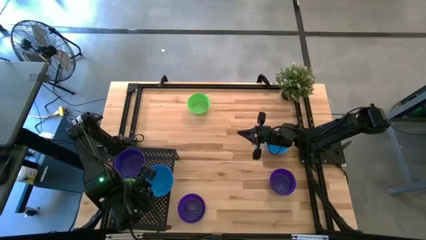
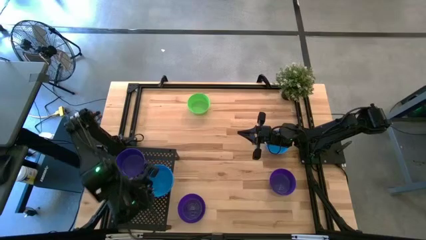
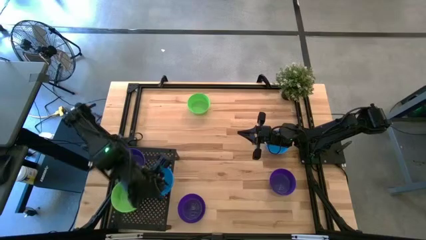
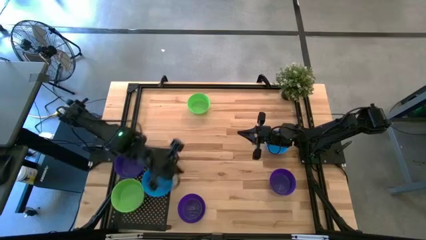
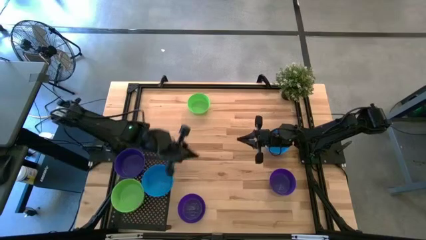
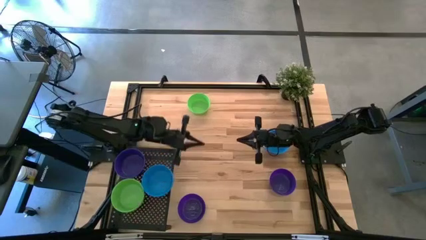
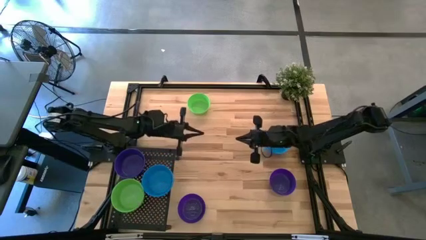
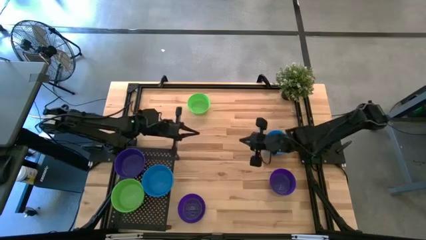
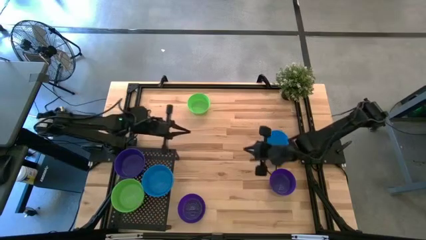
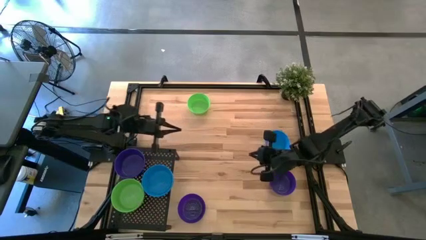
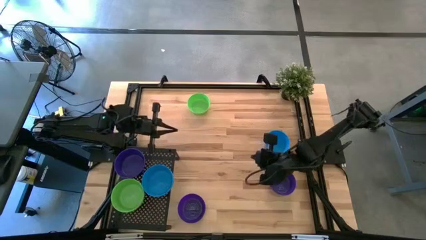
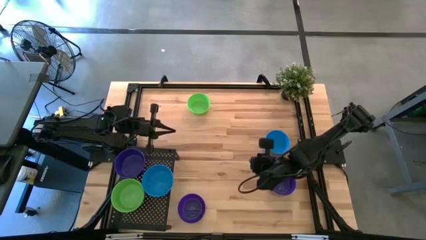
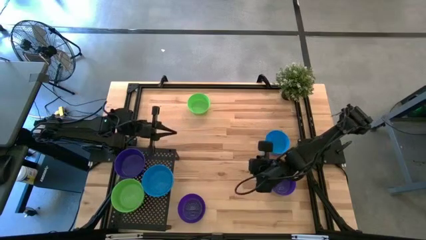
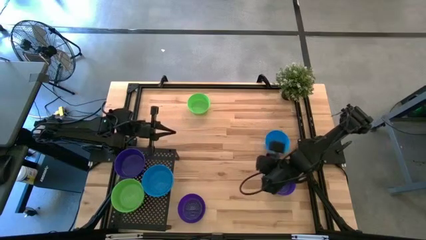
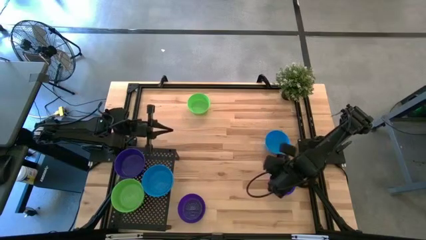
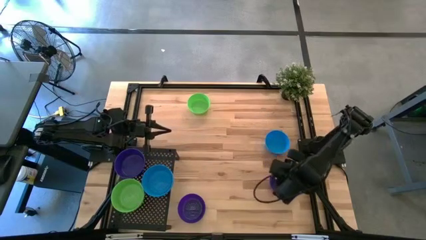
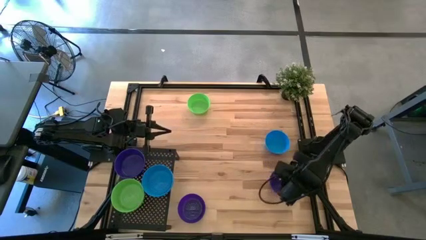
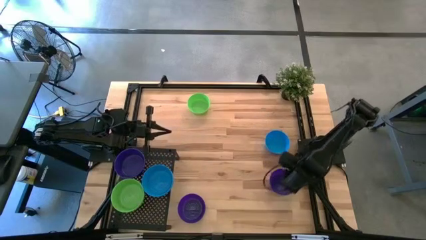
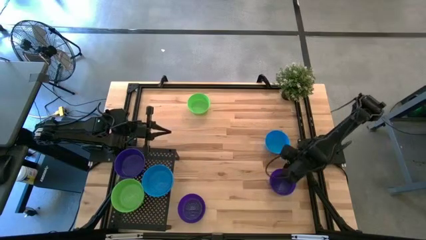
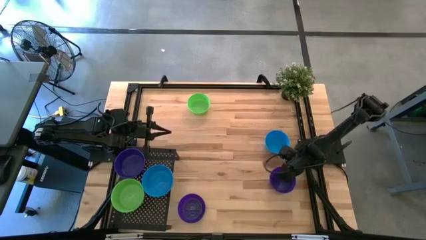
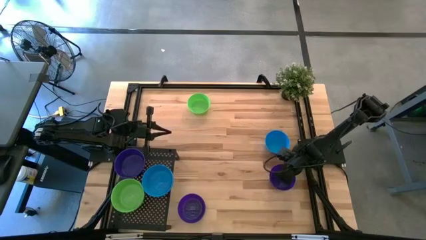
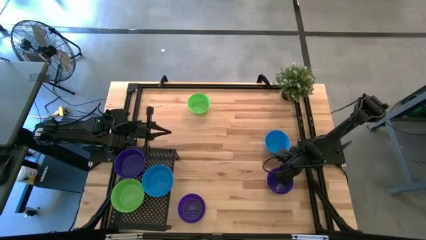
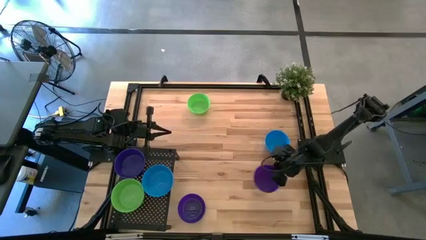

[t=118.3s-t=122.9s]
Task: Pick & Place Mini bowls
Stack the violet bowl on the other violet bowls on the shelf

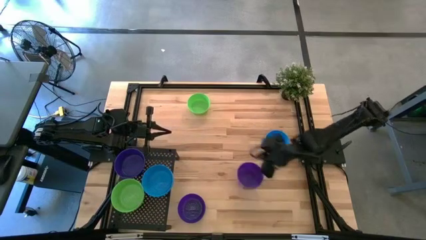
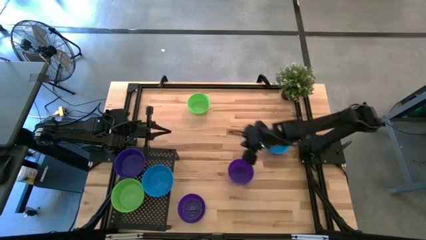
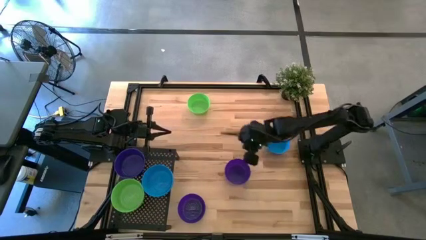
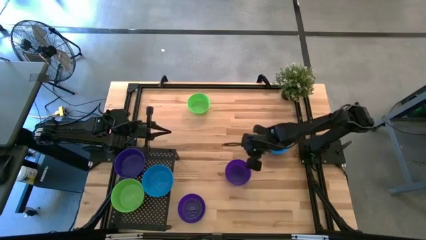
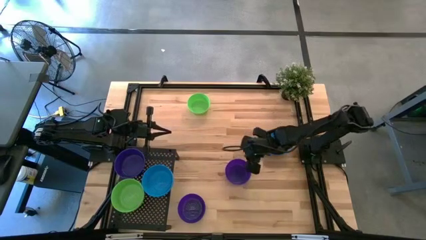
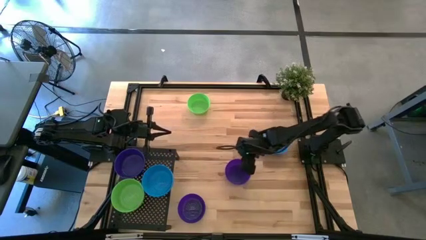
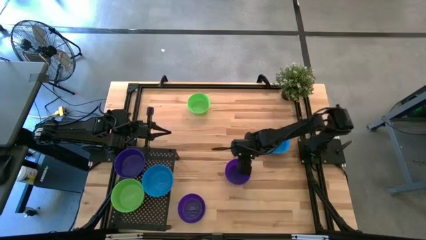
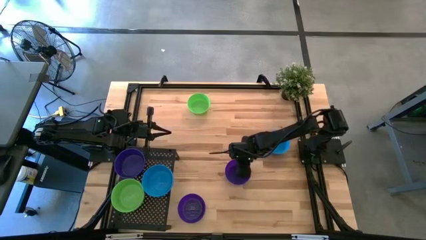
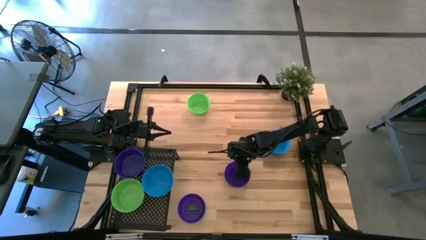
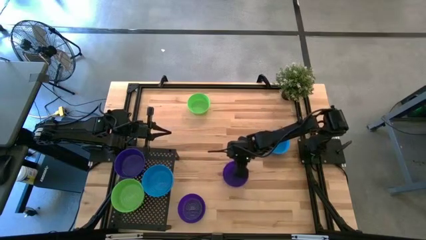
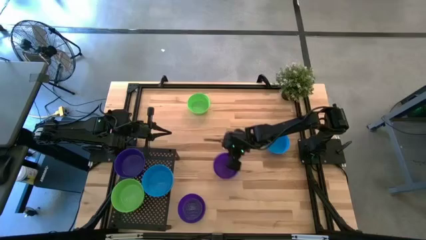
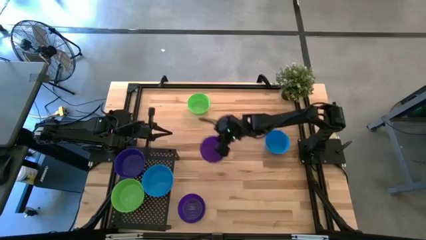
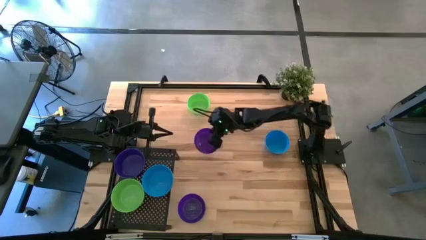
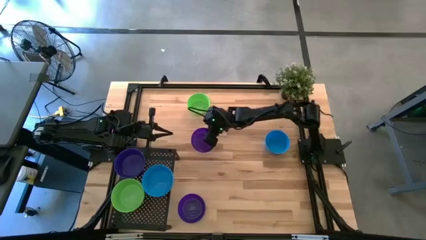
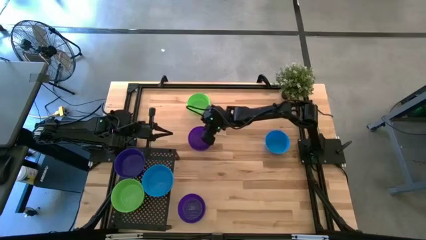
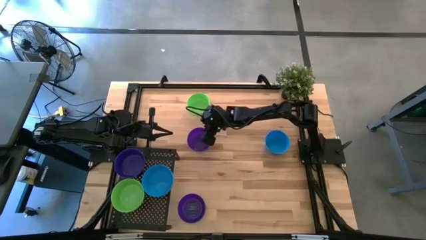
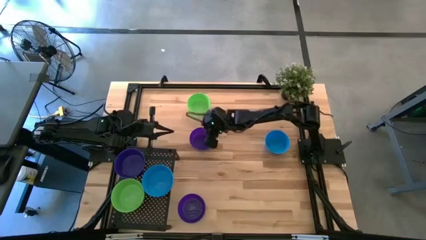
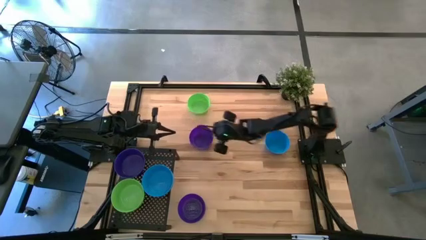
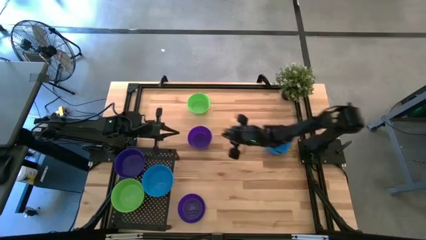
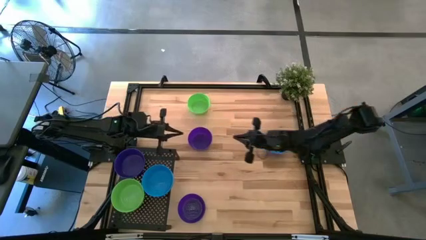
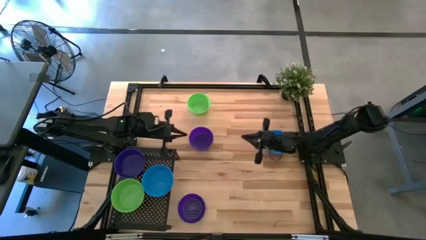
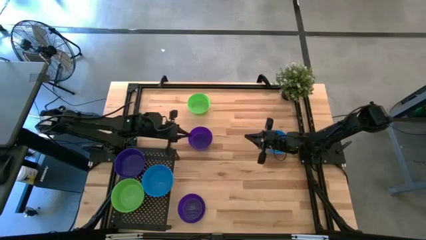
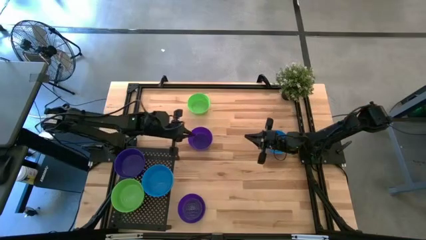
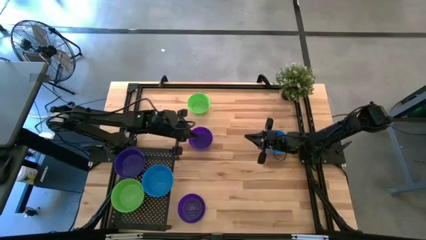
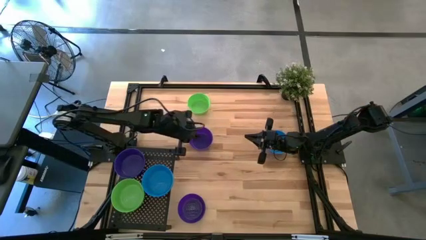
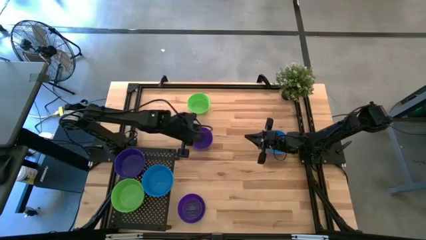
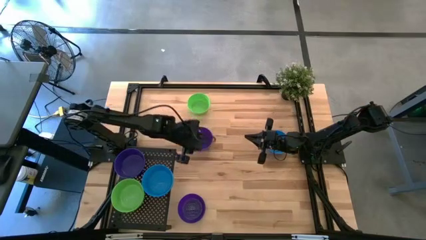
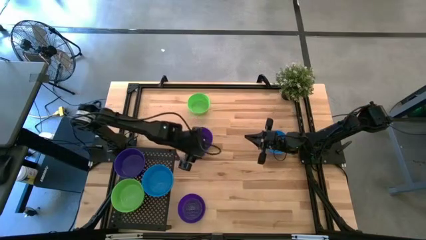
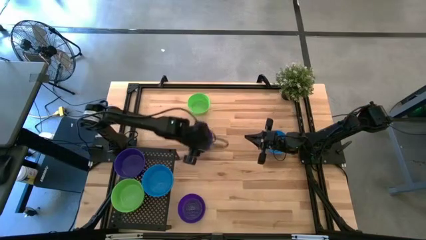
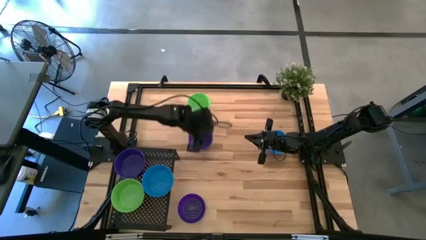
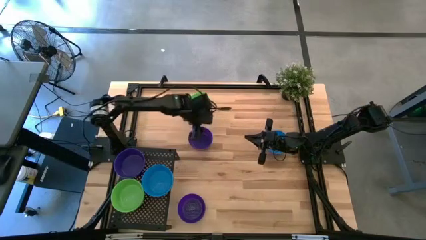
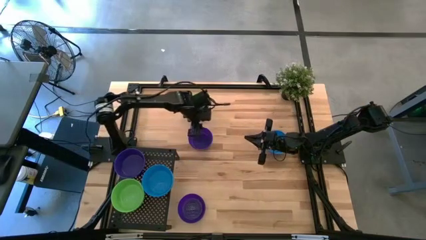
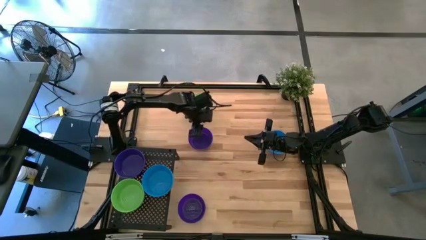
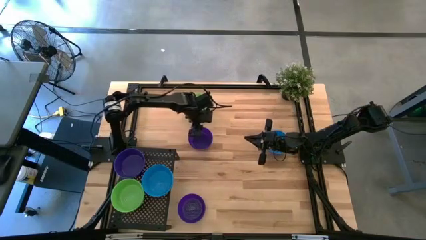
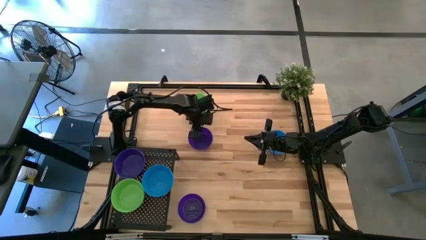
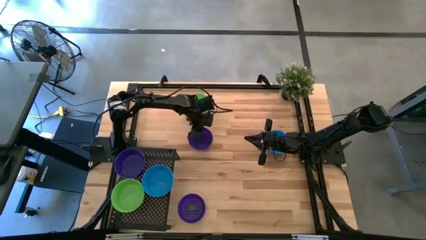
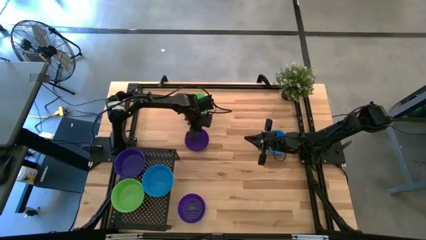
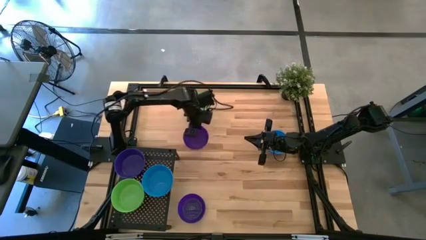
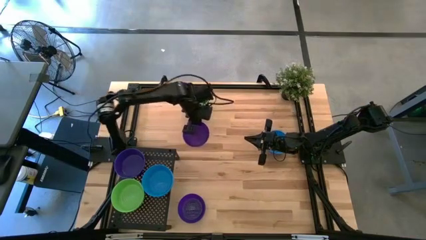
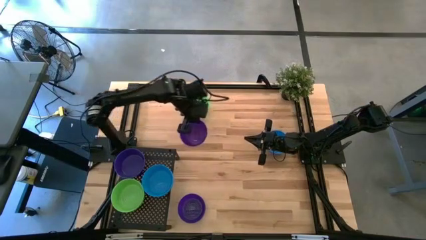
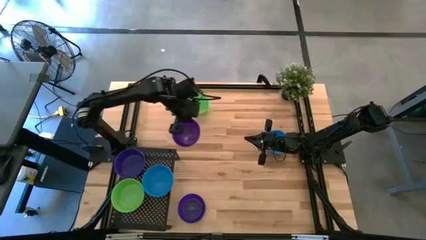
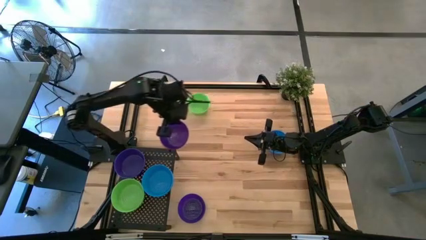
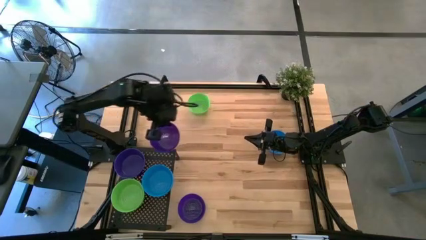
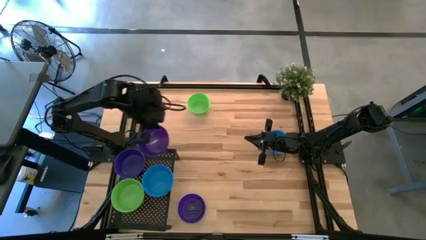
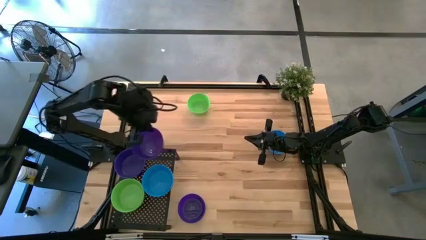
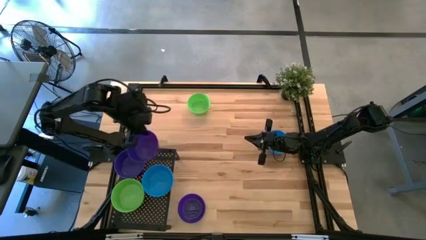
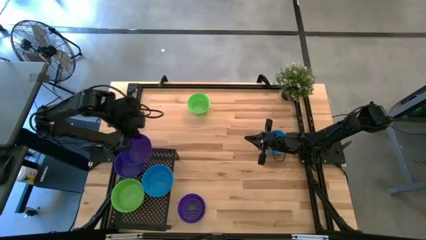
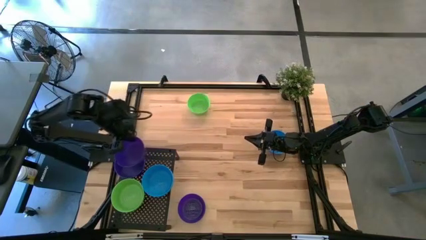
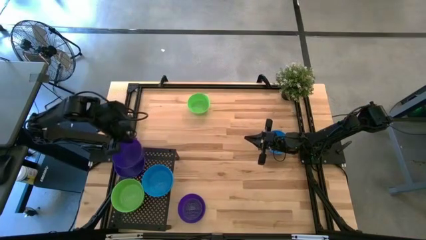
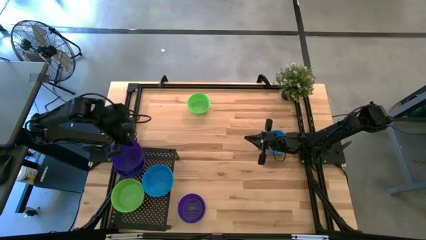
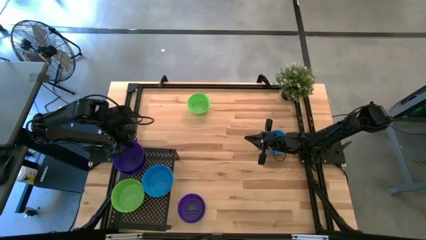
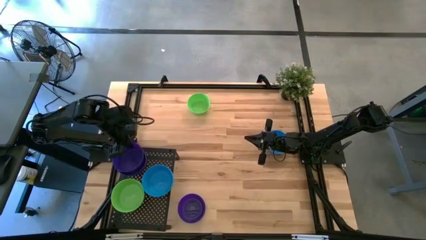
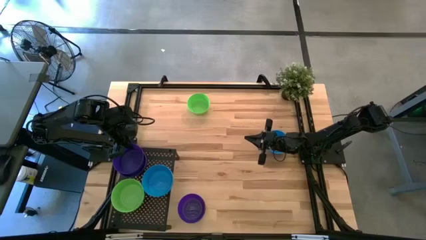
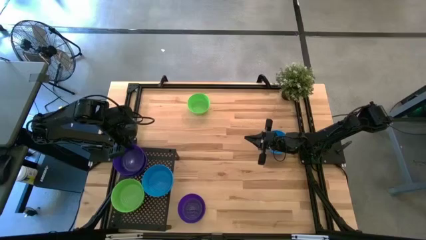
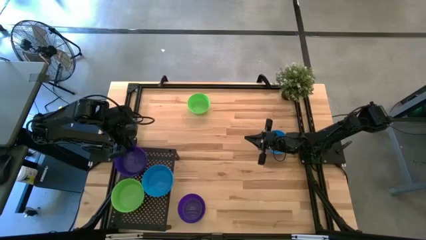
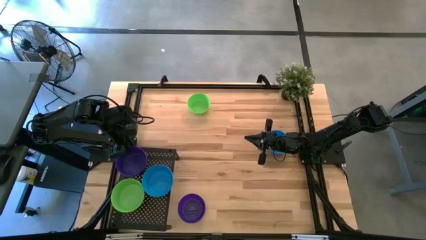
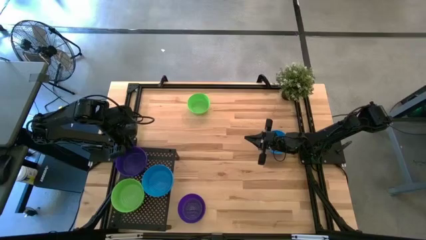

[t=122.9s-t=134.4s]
Stack the violet bowl on the other violet bowls on the shelf
